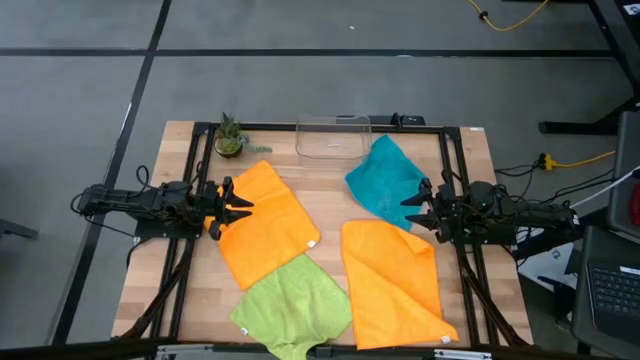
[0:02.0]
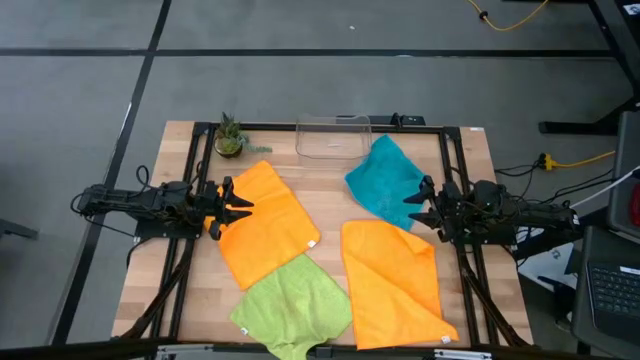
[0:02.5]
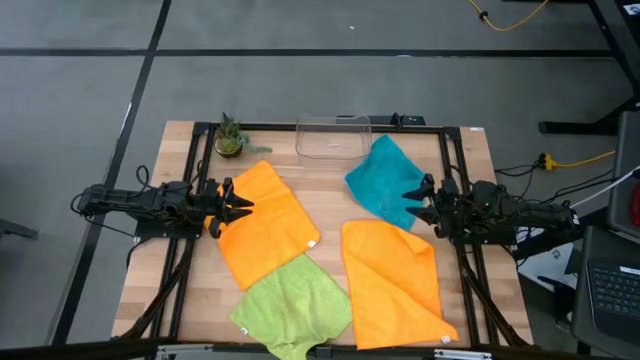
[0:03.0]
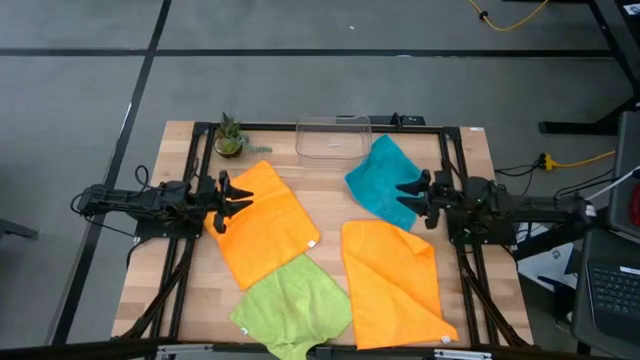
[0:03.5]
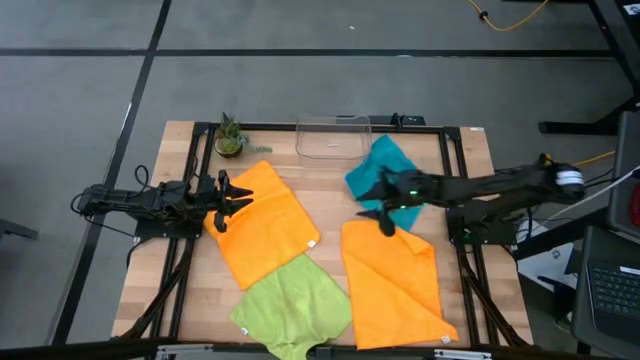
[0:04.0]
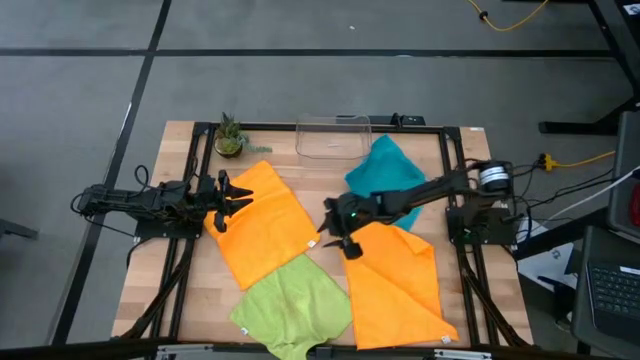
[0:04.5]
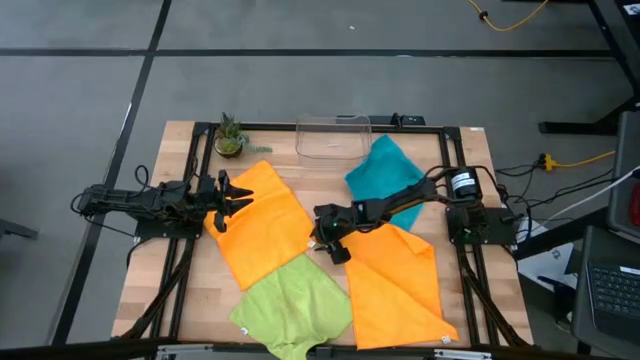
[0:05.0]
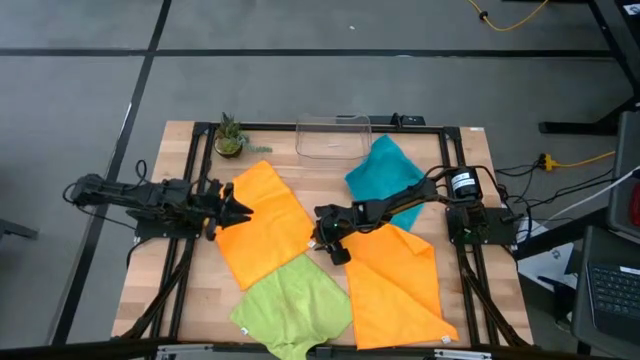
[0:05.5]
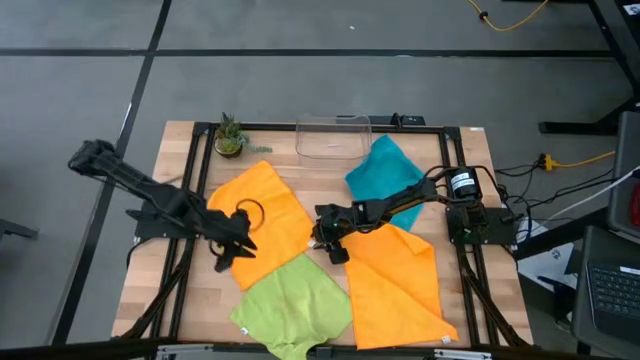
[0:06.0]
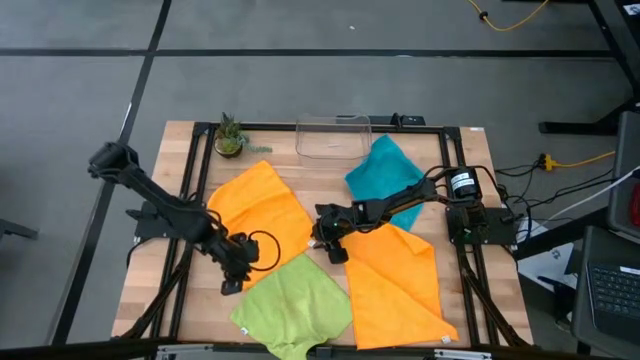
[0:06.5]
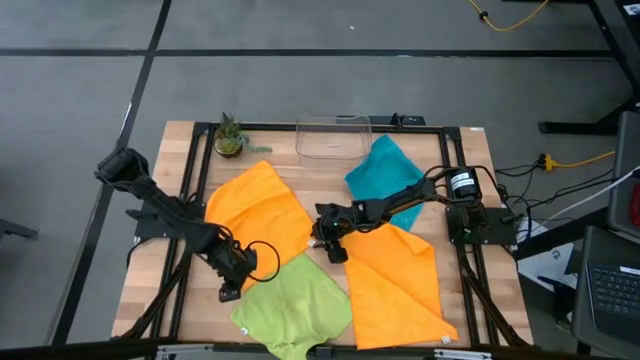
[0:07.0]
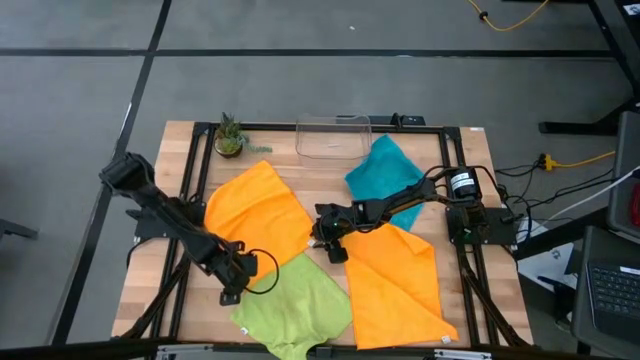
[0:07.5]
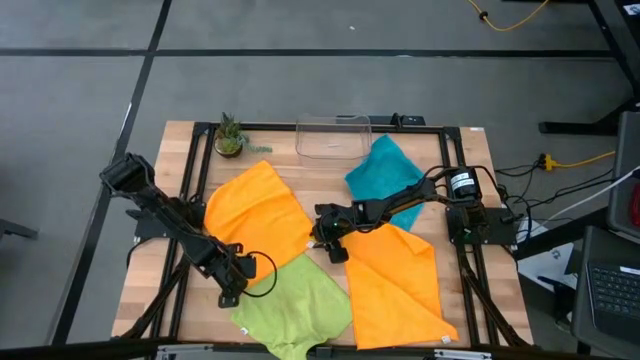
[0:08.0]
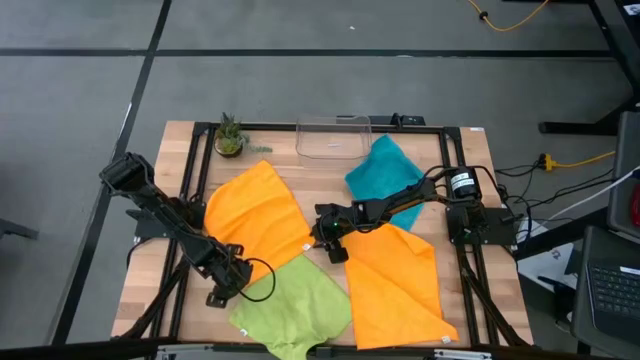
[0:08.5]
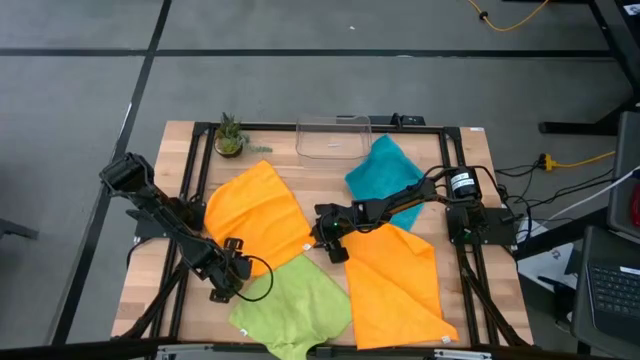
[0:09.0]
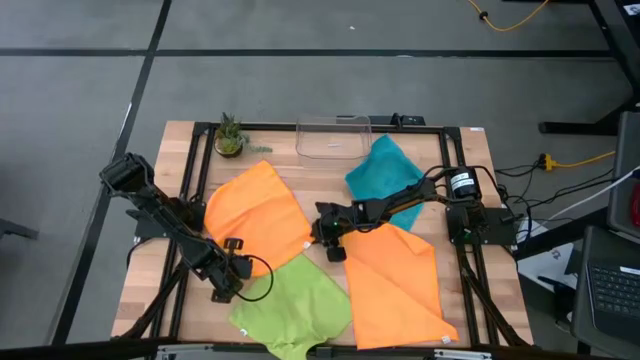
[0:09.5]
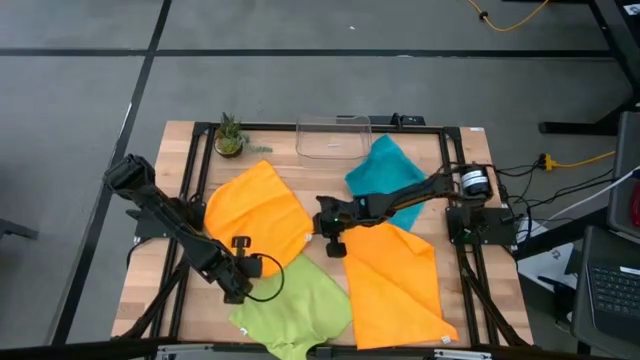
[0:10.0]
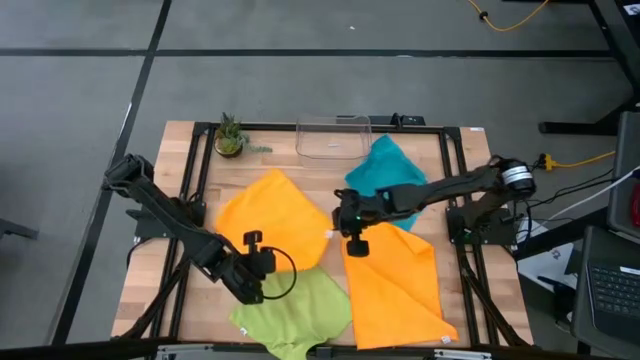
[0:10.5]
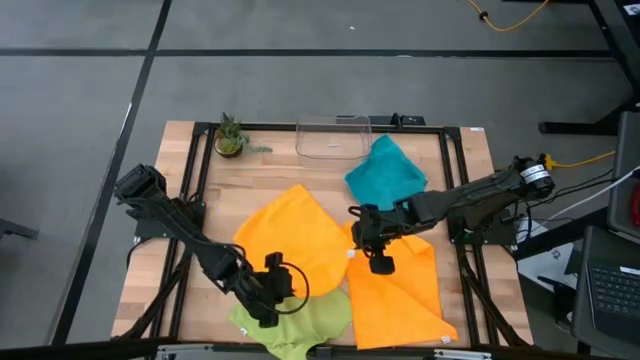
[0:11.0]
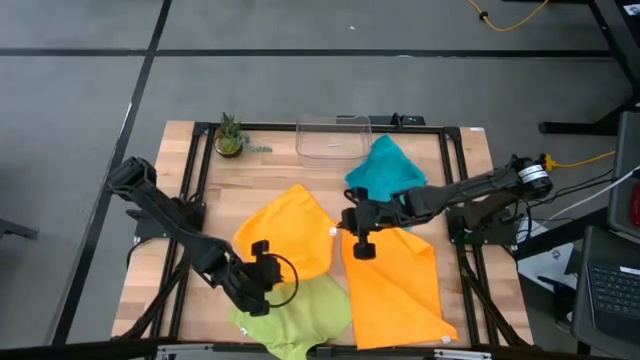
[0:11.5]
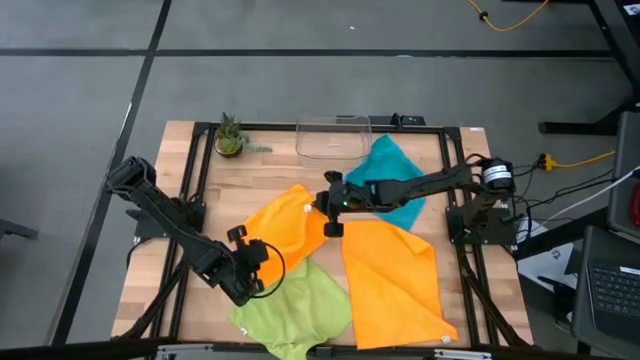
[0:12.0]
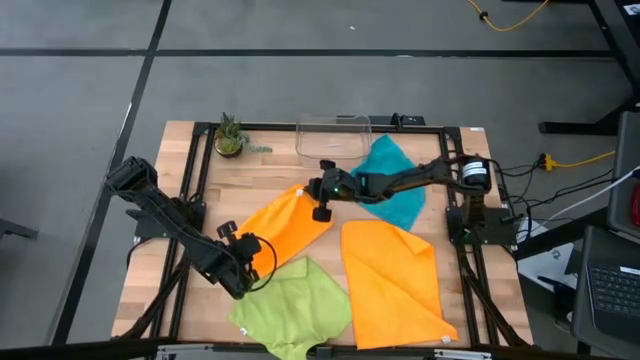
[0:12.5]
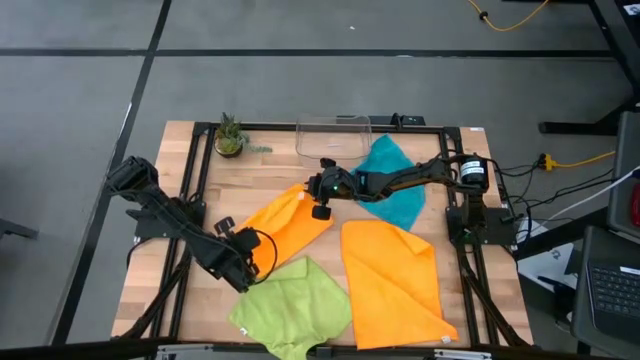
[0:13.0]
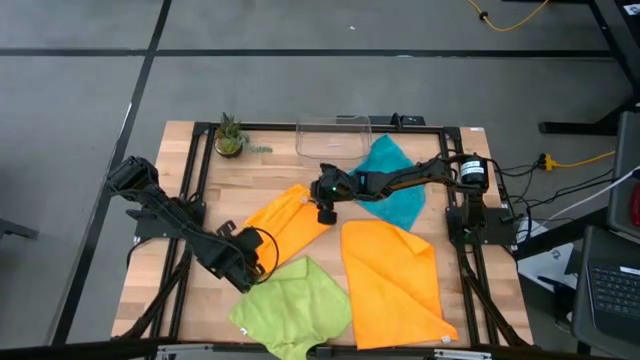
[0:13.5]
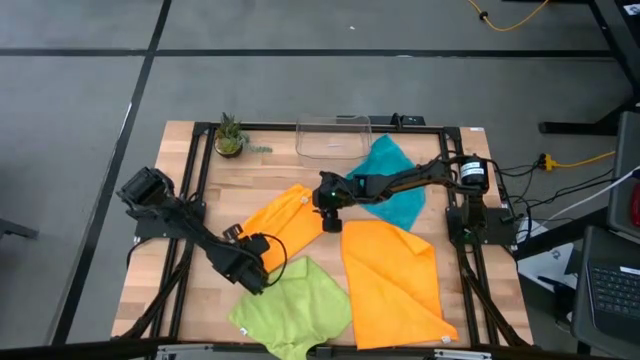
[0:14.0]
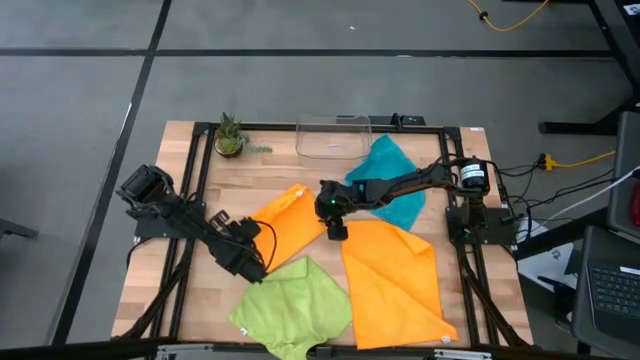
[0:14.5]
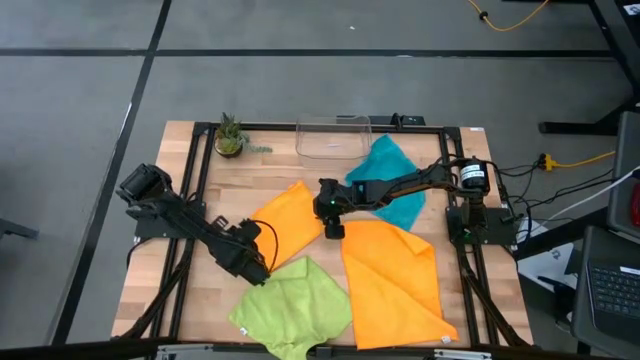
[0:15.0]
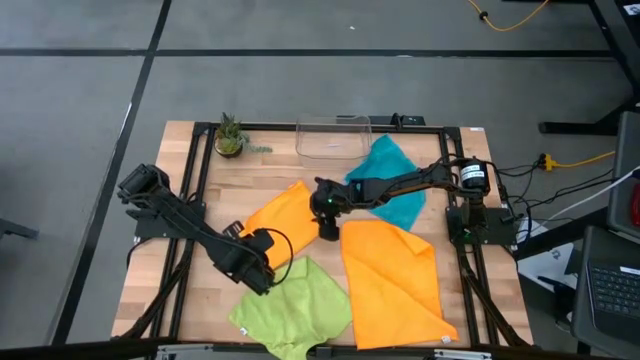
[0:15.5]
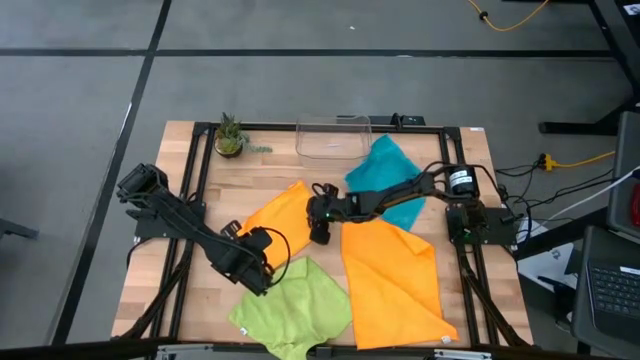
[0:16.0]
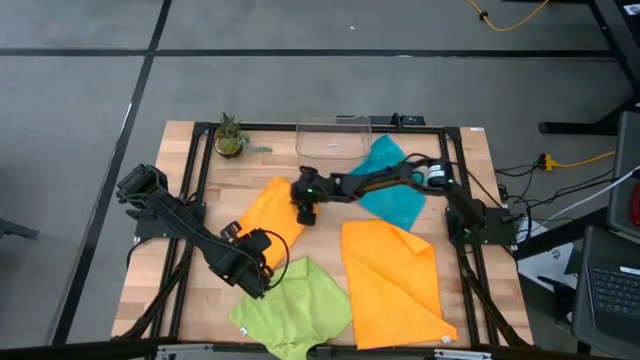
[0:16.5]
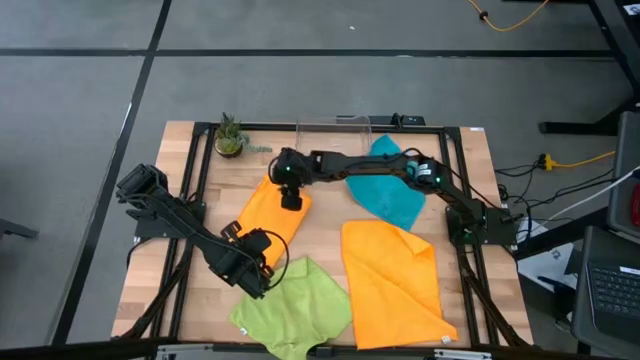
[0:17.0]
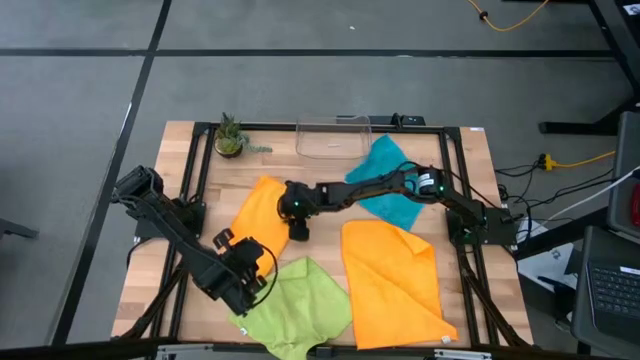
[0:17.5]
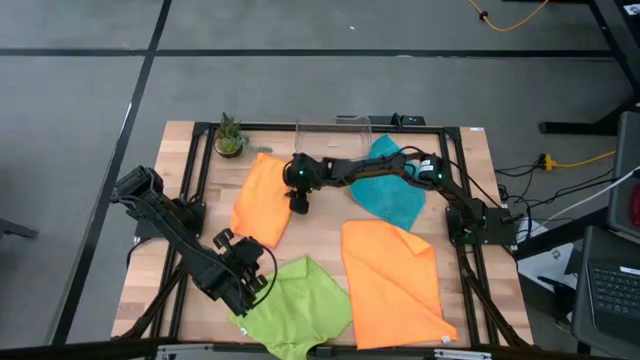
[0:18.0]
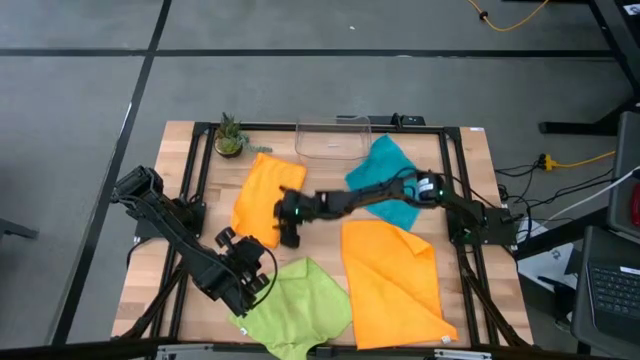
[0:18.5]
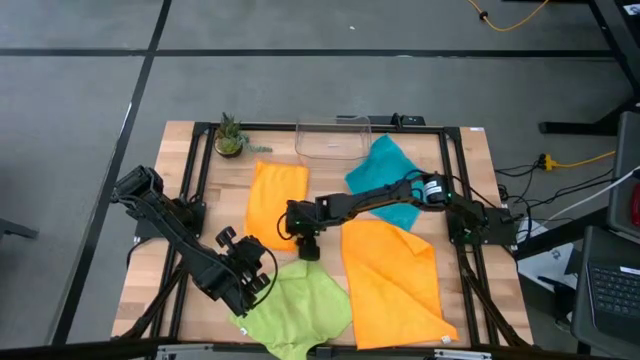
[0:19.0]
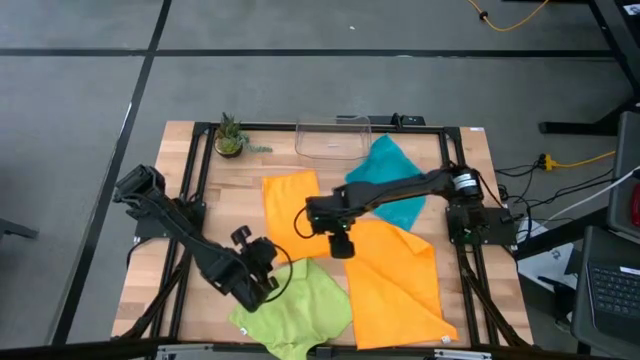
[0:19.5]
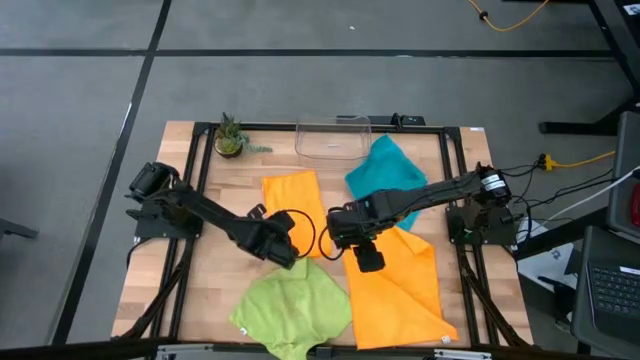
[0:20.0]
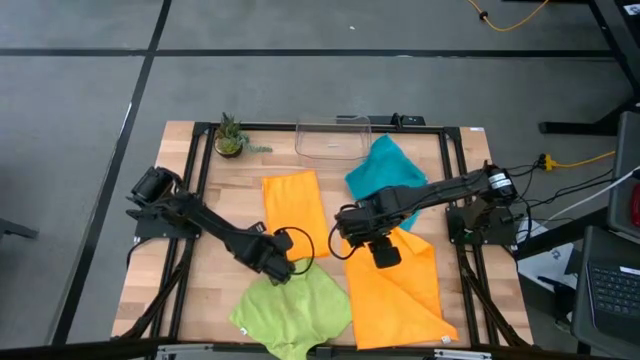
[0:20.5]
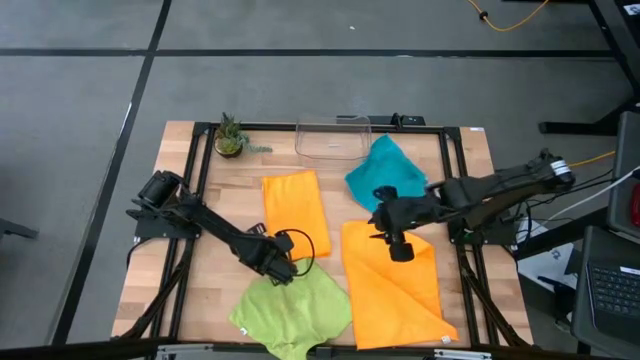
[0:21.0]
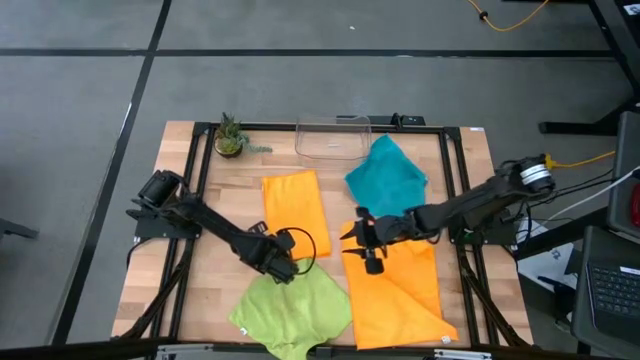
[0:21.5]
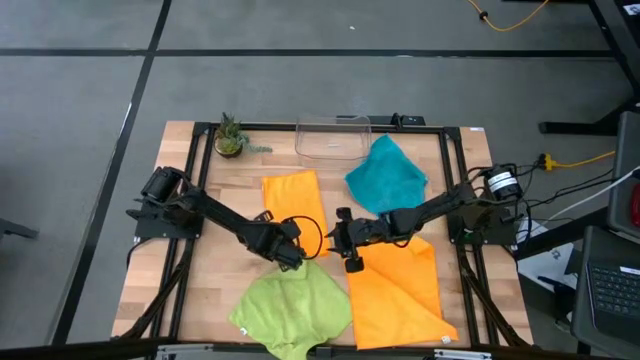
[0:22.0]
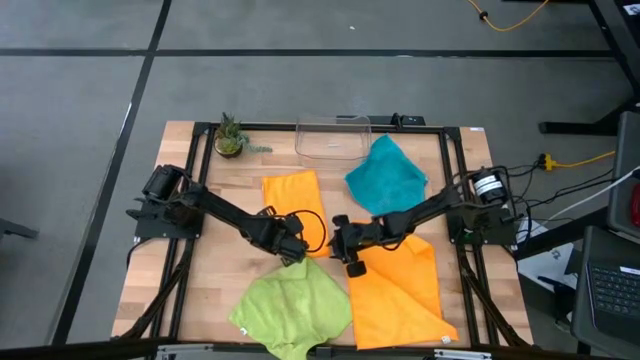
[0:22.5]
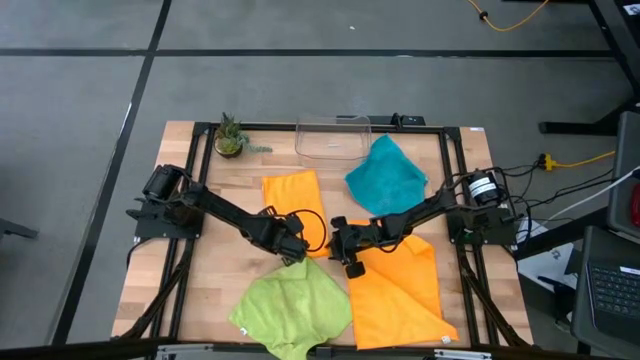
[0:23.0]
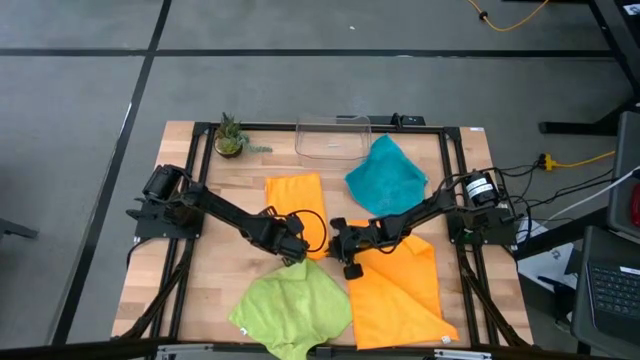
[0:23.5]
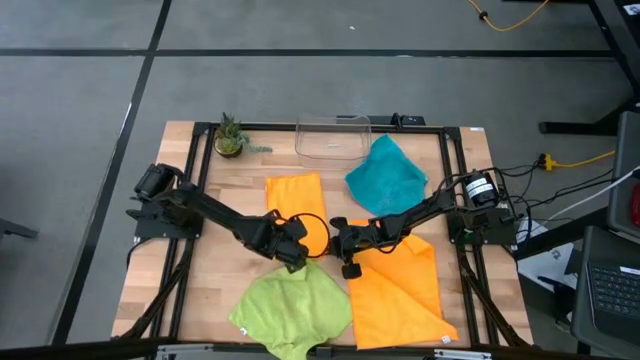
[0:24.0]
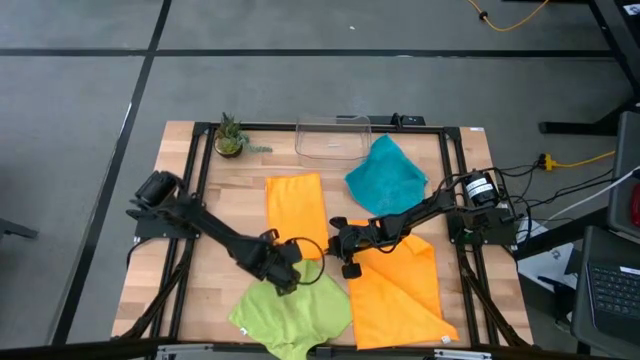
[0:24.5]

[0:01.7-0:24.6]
Task: Fold microfiber towels
Fold the orange microfiber cloth
